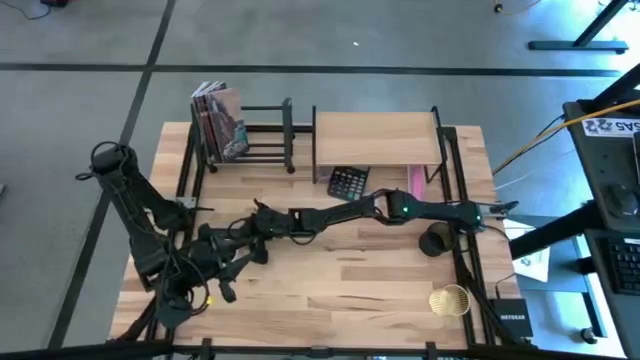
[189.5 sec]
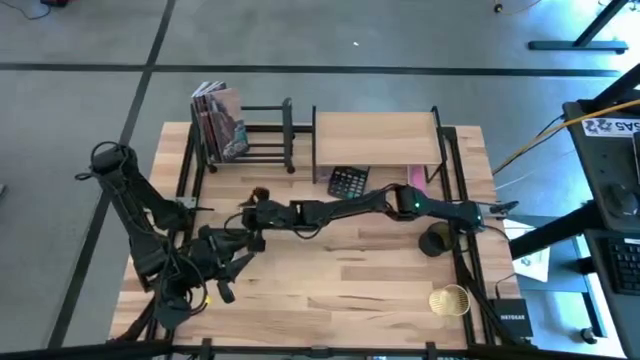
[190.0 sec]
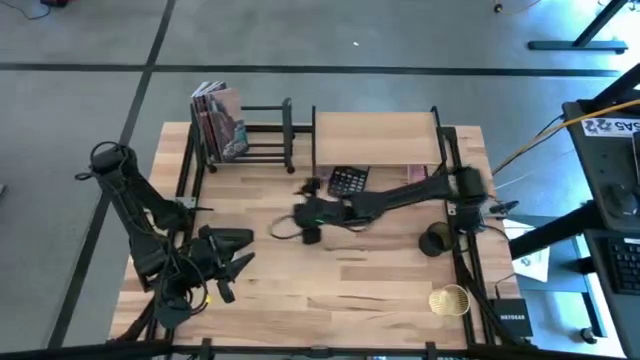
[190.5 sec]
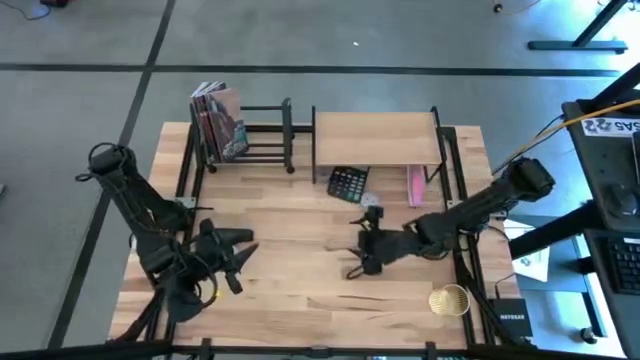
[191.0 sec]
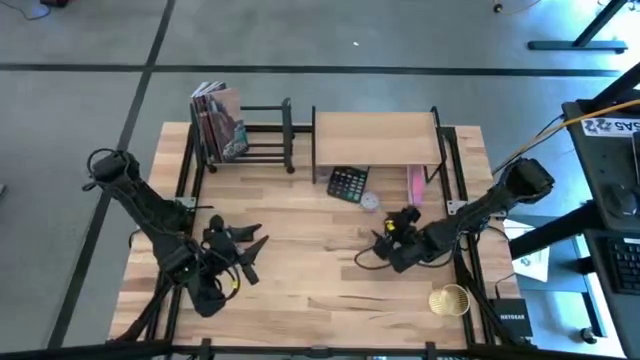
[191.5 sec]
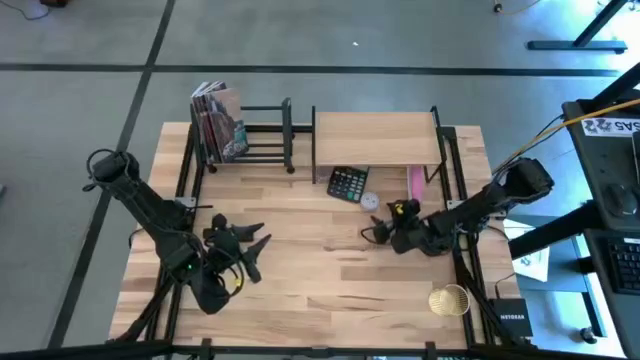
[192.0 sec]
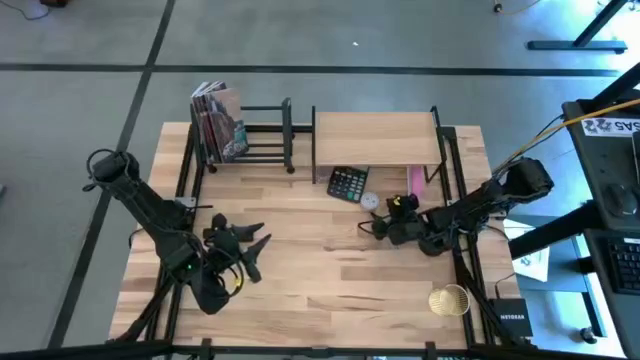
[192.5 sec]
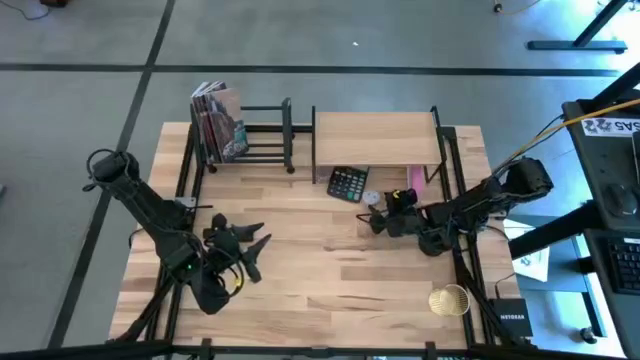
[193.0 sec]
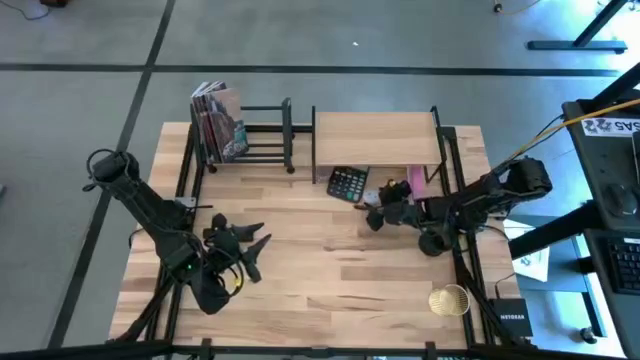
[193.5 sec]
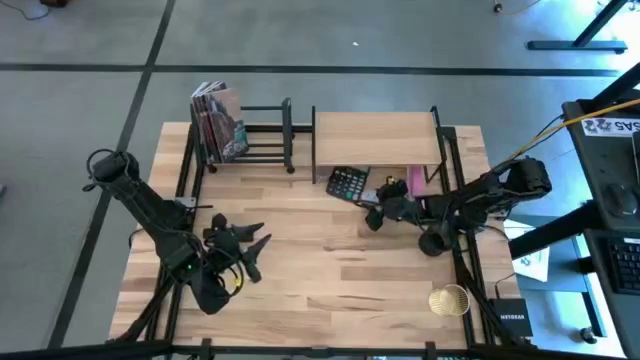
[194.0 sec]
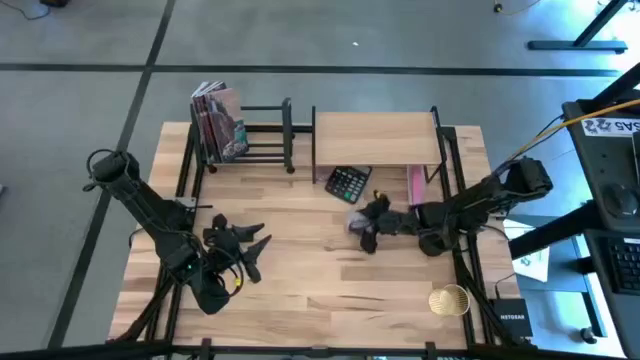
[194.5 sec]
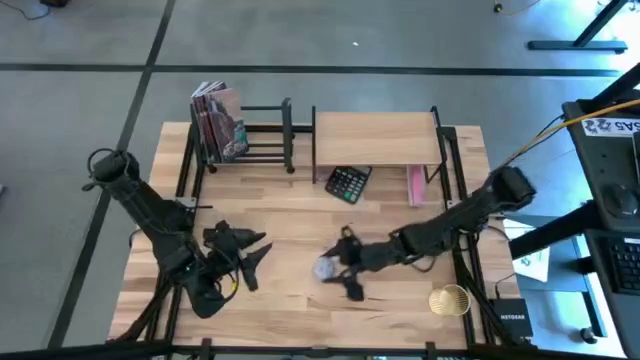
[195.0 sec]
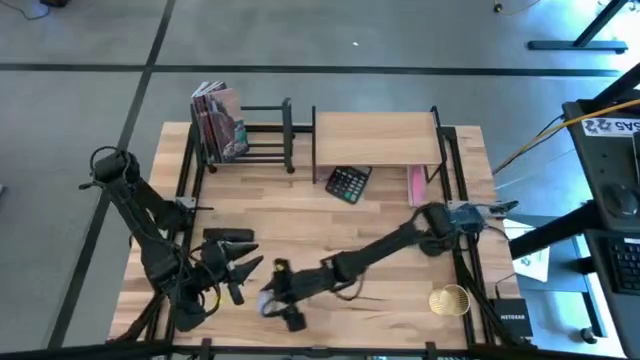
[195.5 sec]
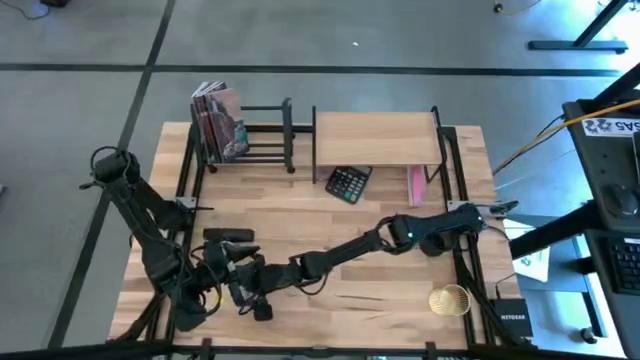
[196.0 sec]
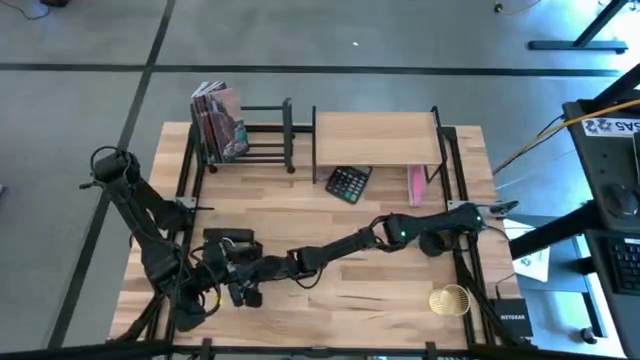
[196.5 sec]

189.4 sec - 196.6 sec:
Task: Stock shelves
Remove the pink scented candle jar from under the shelf

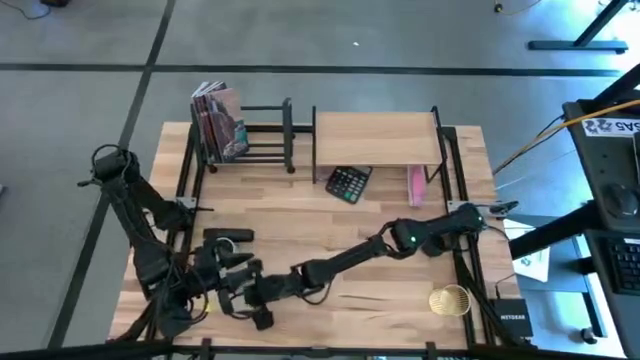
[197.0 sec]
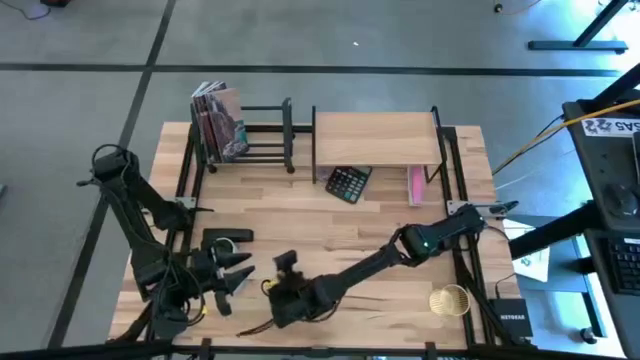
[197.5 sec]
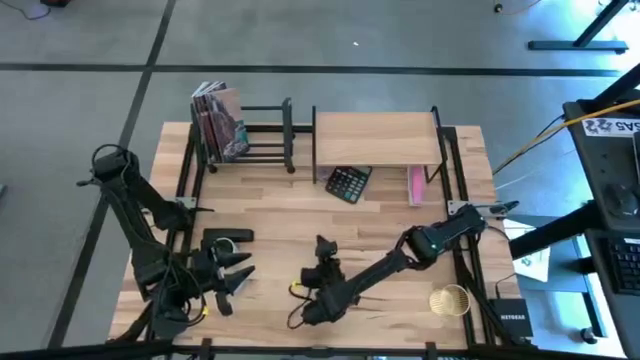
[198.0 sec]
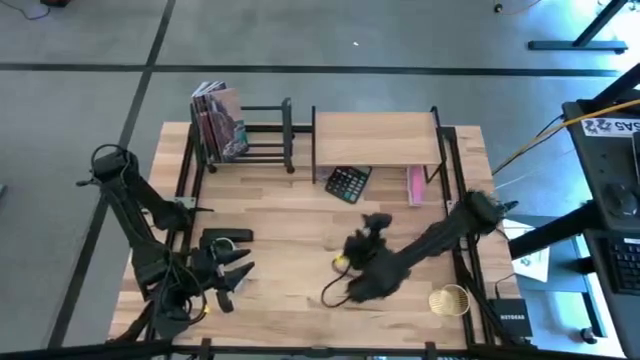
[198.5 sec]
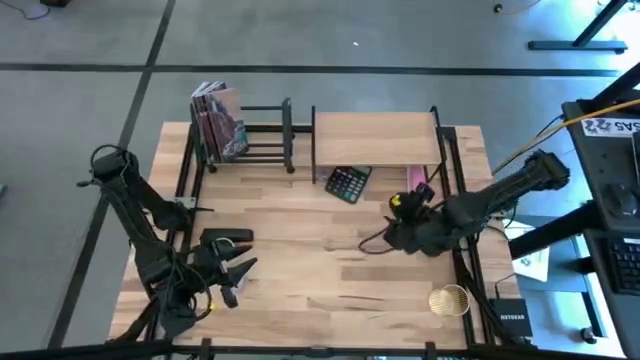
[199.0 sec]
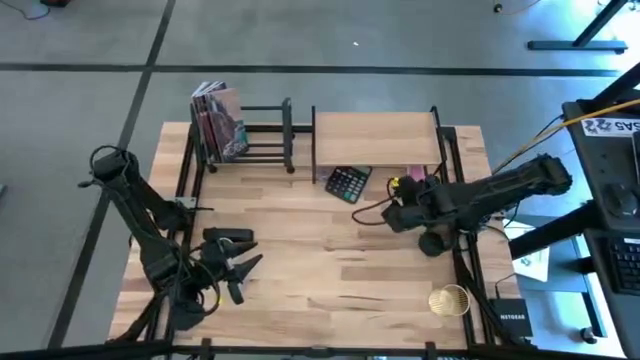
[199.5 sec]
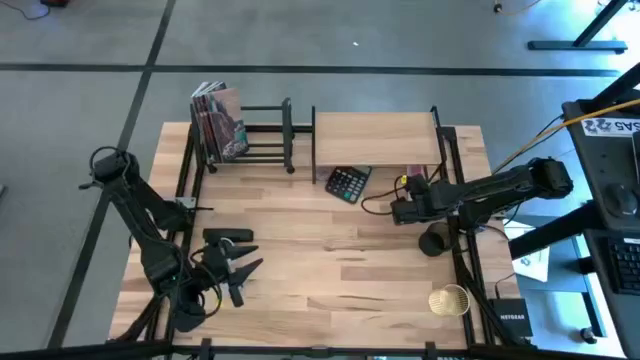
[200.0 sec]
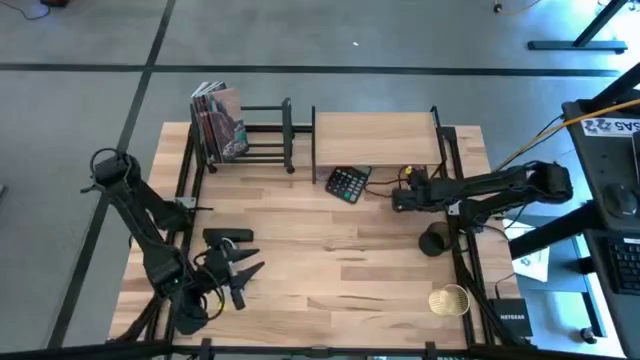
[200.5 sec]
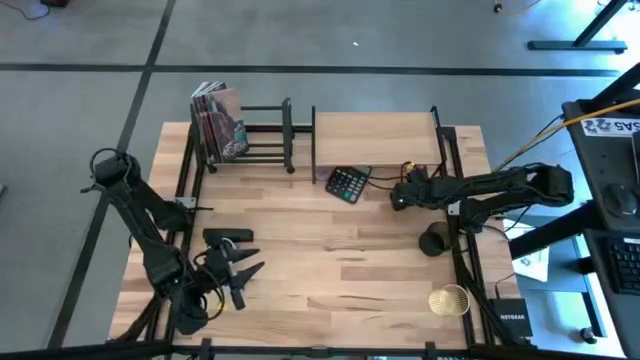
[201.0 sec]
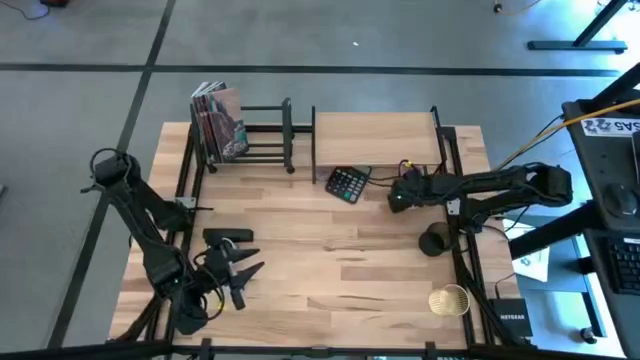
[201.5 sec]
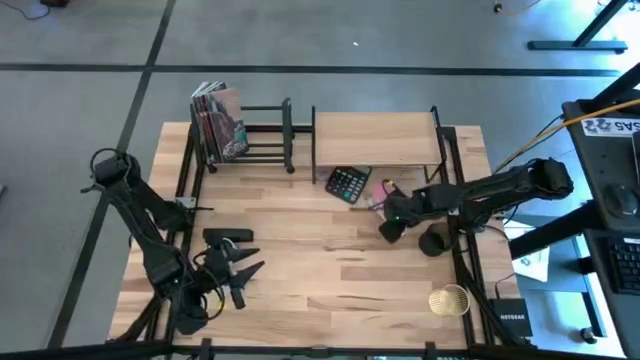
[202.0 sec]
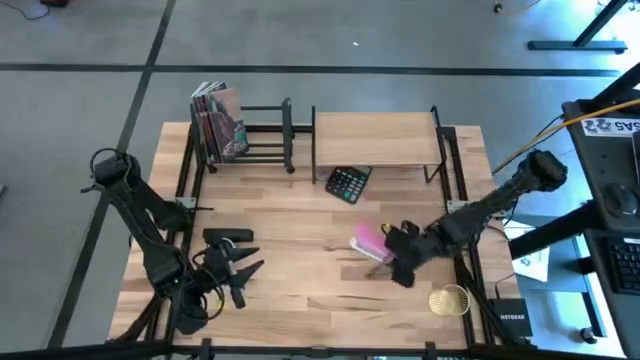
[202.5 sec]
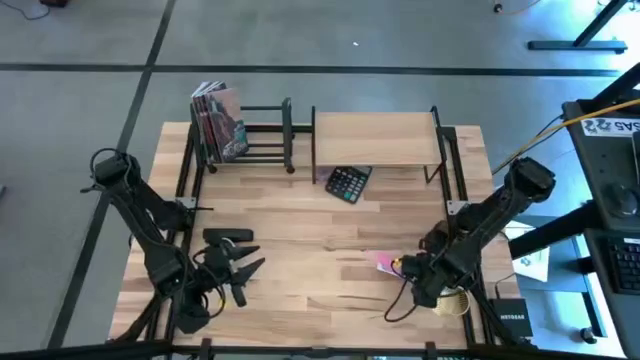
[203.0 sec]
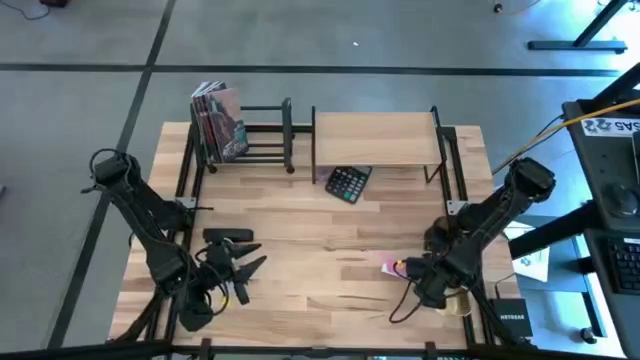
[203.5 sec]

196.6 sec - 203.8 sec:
Remove the pink stapler from under the shelf

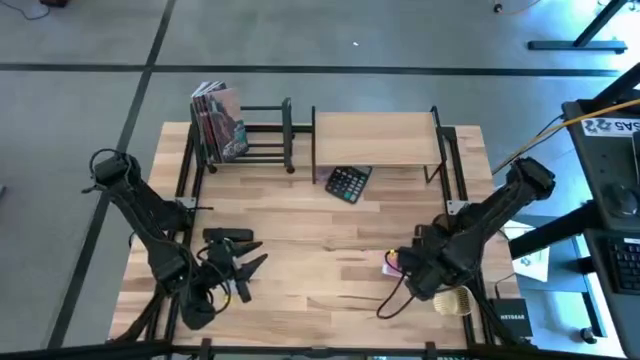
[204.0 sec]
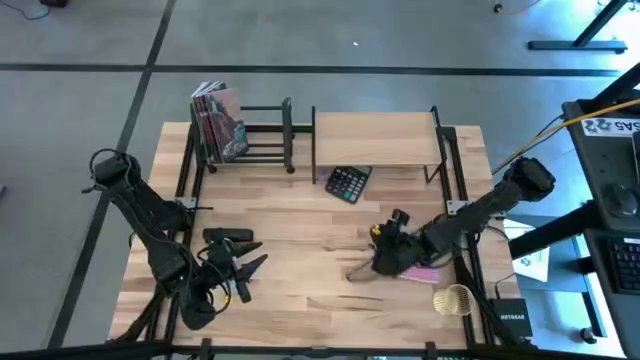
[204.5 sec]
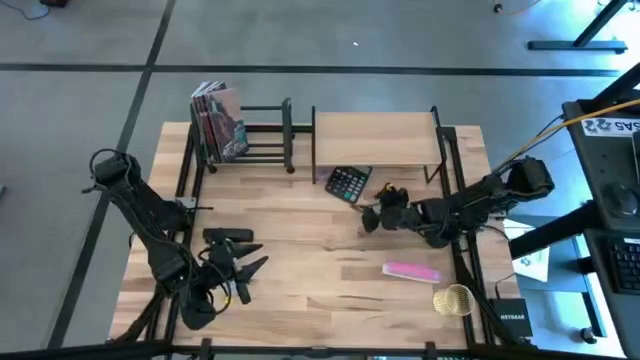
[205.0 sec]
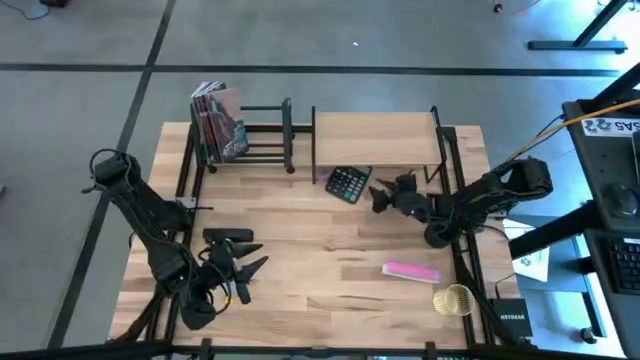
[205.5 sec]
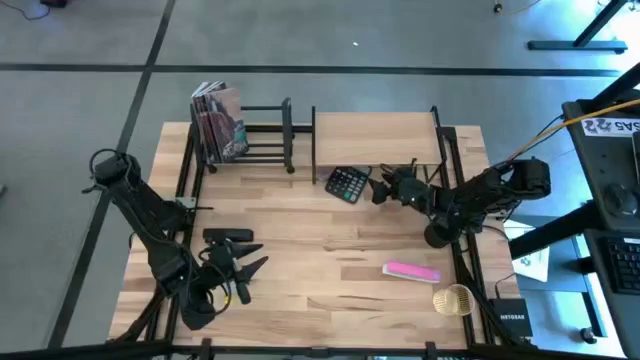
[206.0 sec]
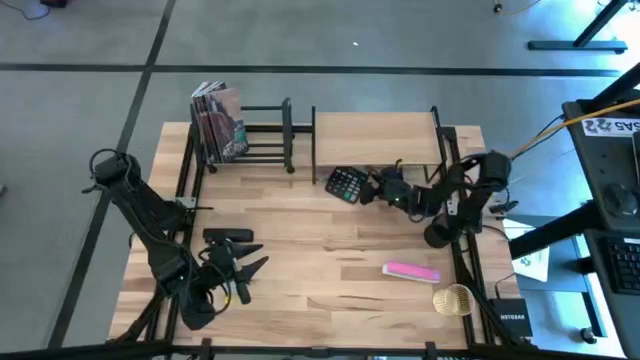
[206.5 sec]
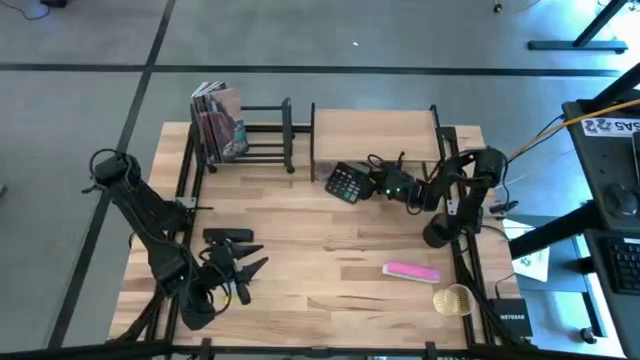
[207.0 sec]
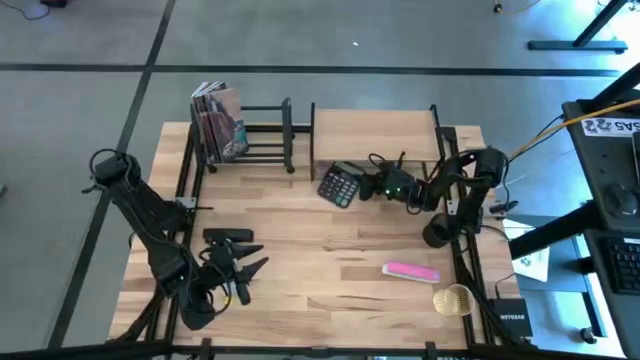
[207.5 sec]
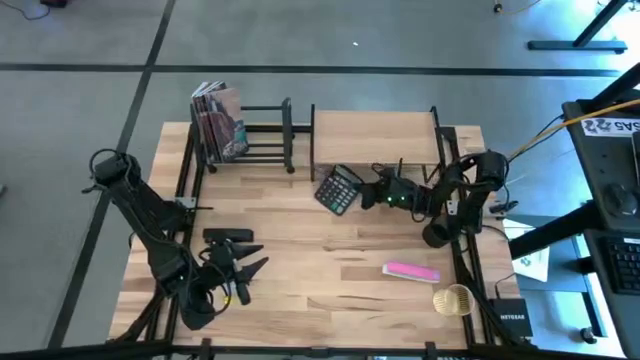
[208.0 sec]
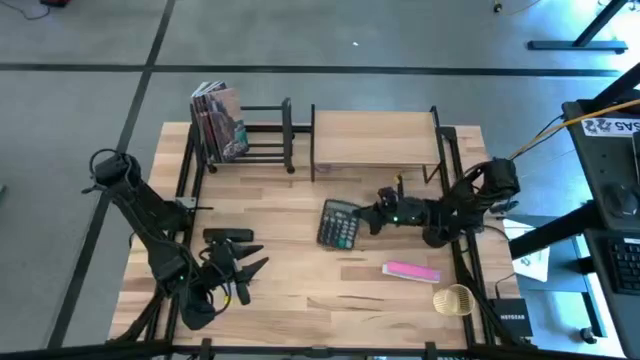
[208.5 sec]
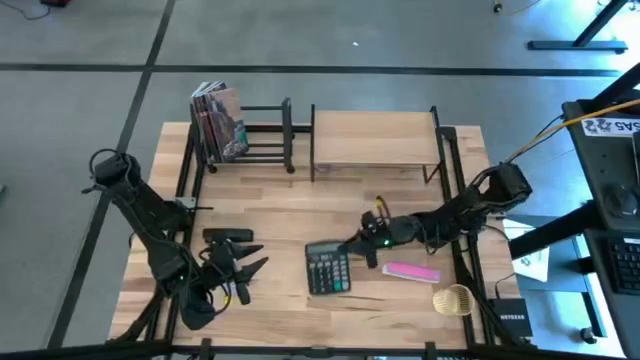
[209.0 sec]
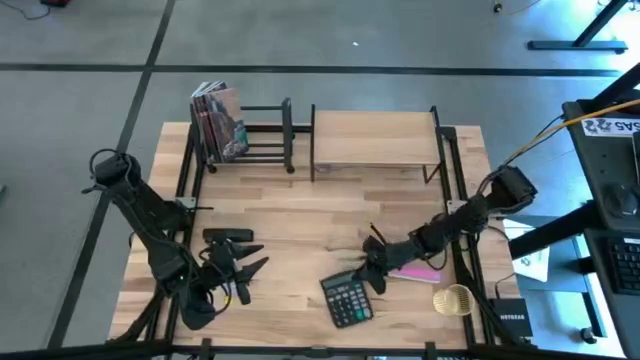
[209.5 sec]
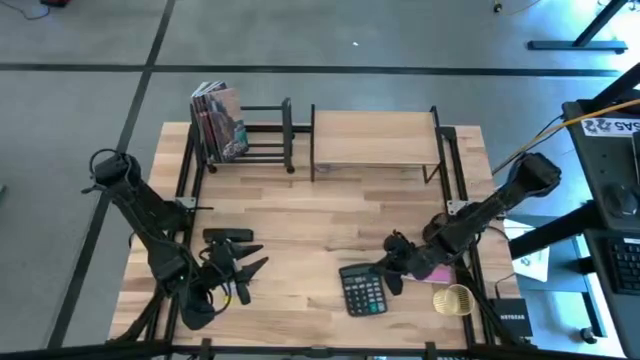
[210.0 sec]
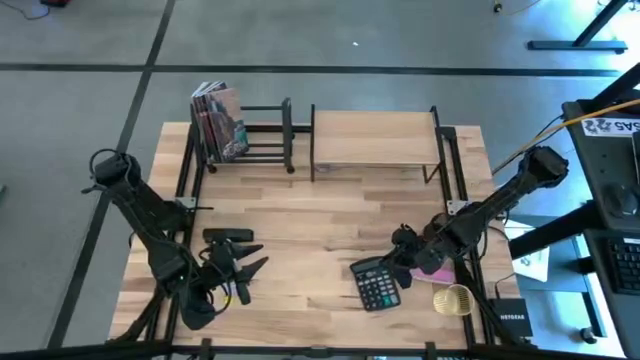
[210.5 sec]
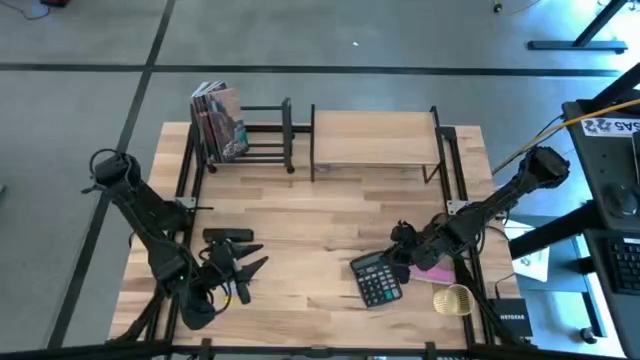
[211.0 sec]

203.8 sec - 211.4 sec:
Remove the black calculator from under the shelf
